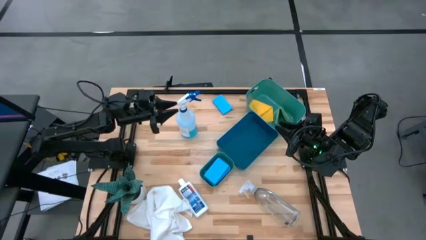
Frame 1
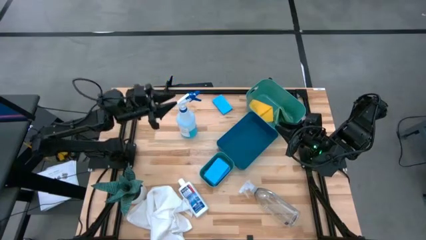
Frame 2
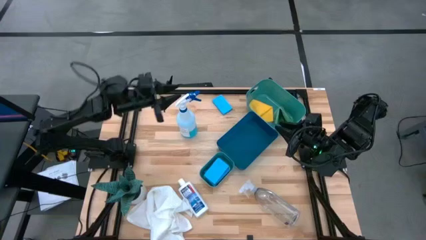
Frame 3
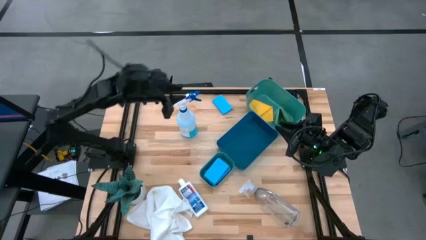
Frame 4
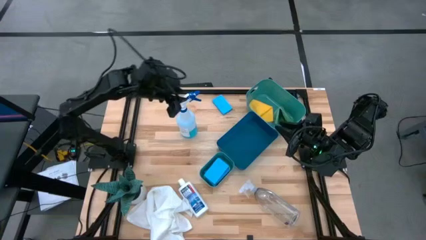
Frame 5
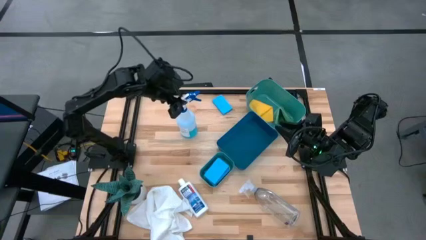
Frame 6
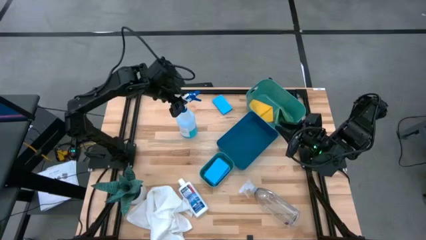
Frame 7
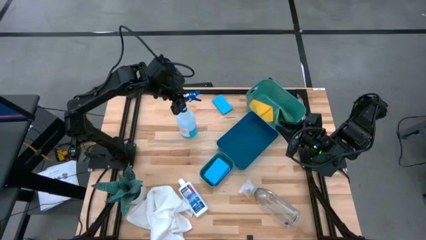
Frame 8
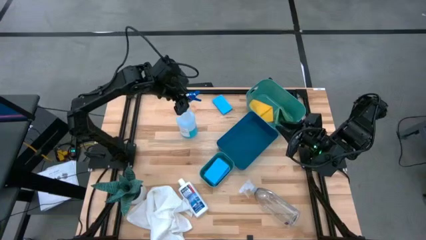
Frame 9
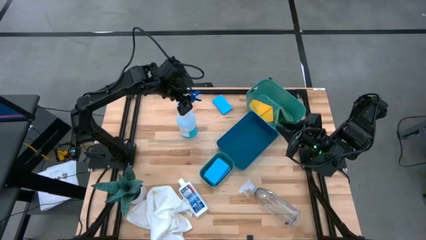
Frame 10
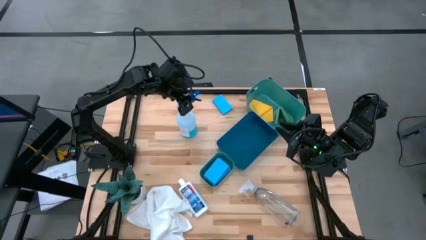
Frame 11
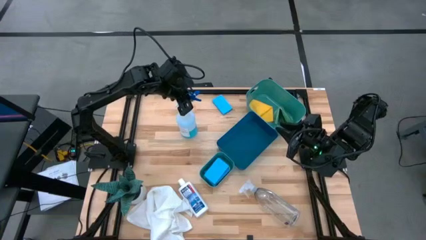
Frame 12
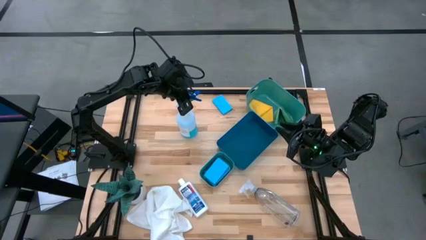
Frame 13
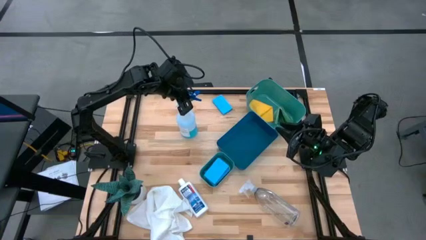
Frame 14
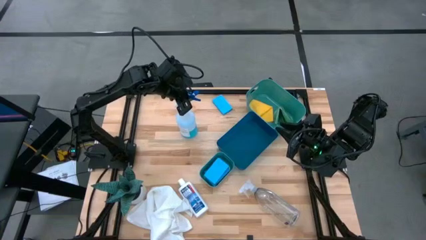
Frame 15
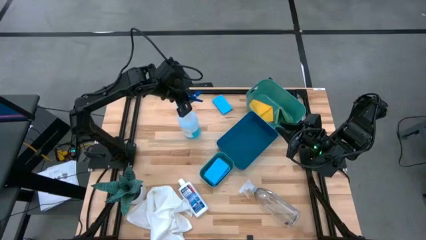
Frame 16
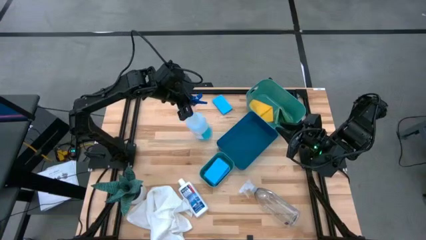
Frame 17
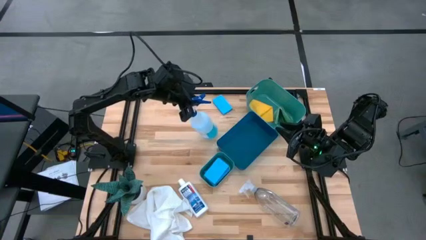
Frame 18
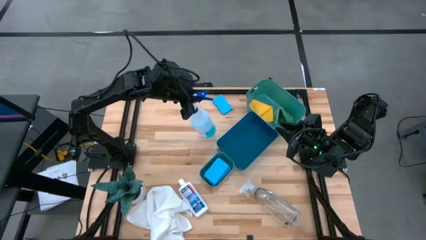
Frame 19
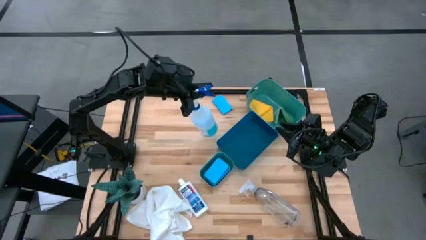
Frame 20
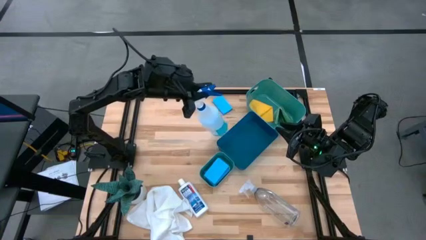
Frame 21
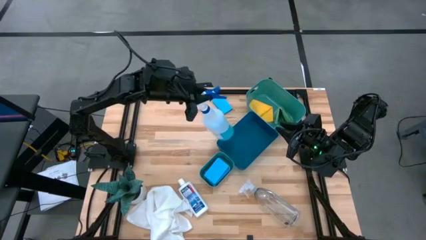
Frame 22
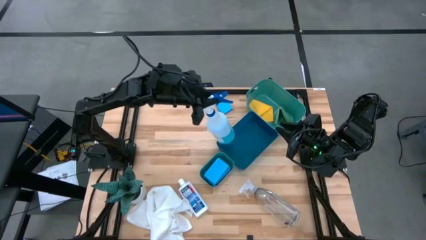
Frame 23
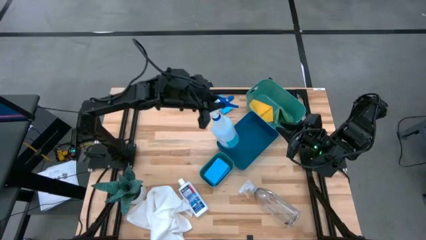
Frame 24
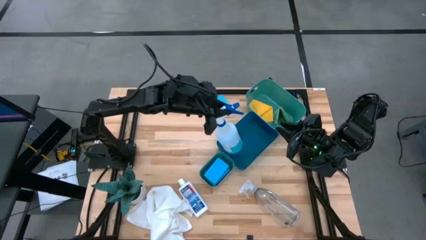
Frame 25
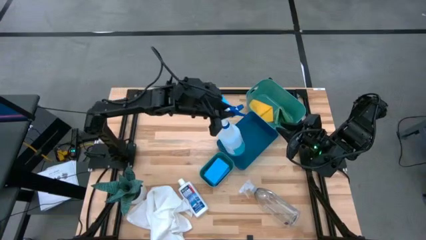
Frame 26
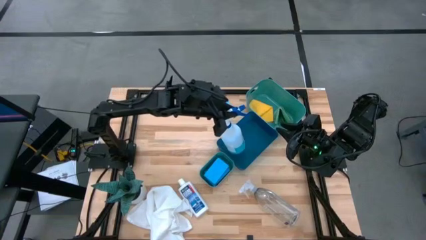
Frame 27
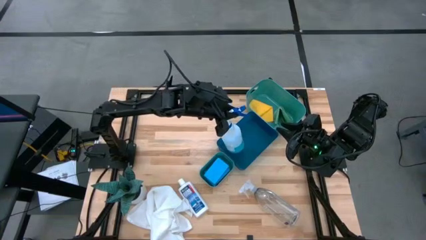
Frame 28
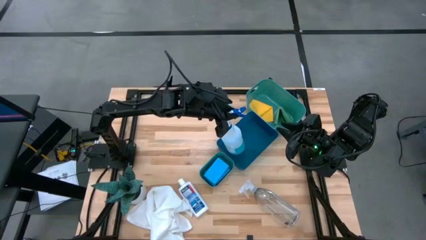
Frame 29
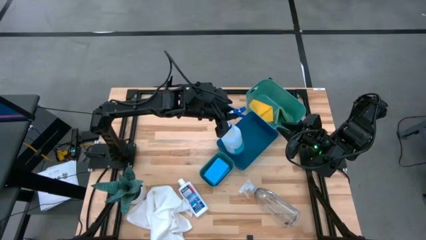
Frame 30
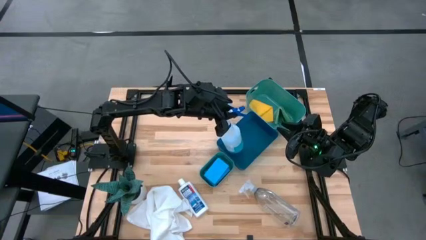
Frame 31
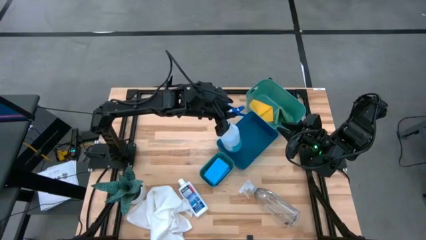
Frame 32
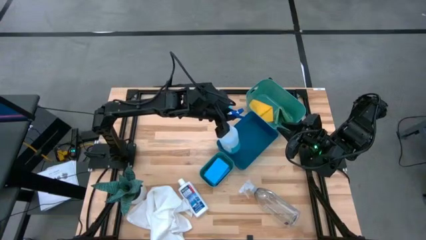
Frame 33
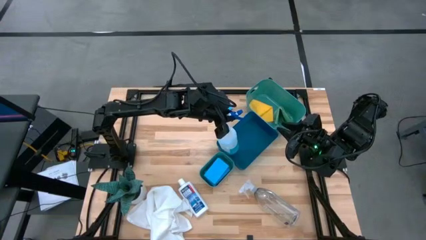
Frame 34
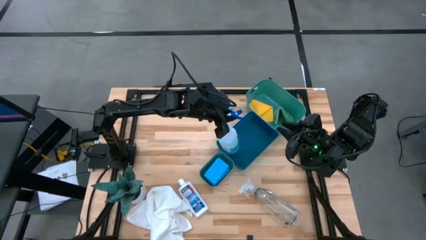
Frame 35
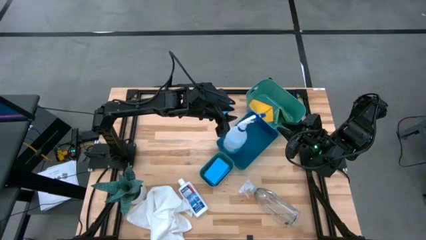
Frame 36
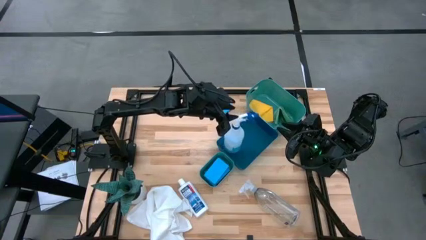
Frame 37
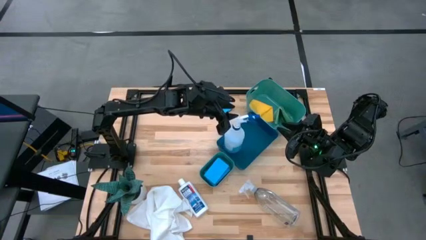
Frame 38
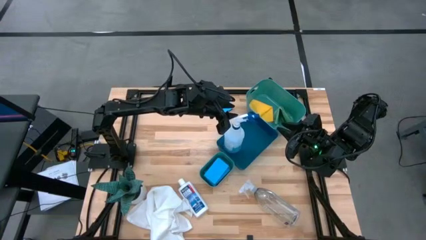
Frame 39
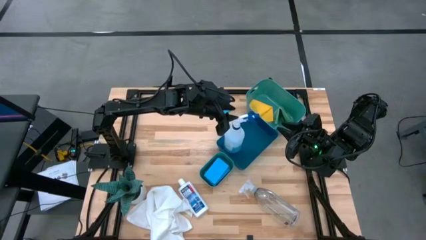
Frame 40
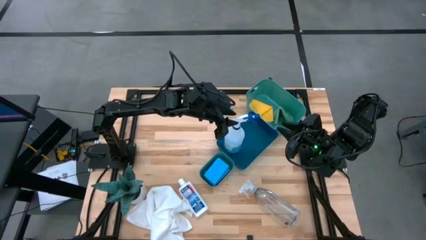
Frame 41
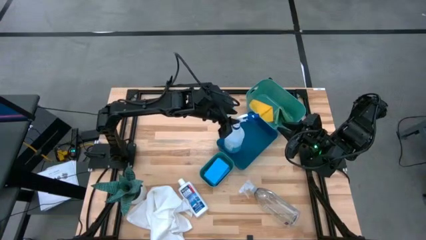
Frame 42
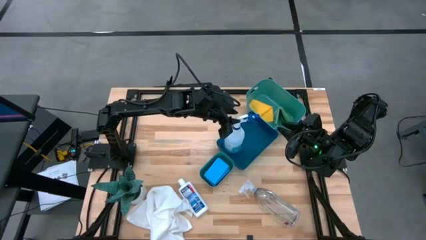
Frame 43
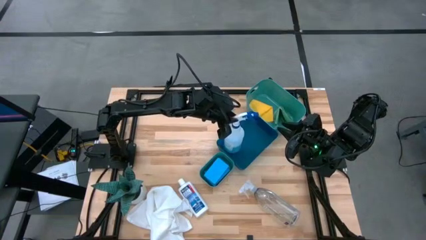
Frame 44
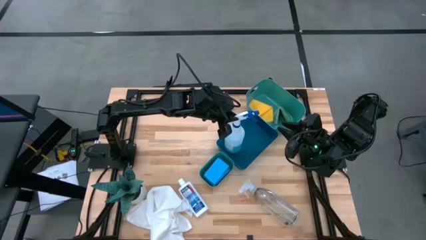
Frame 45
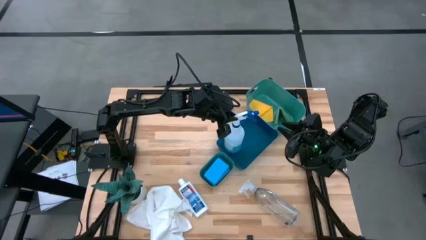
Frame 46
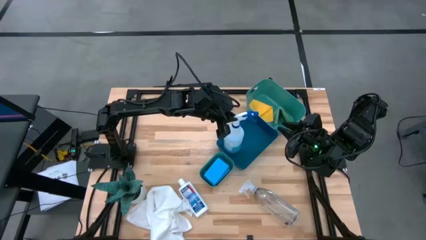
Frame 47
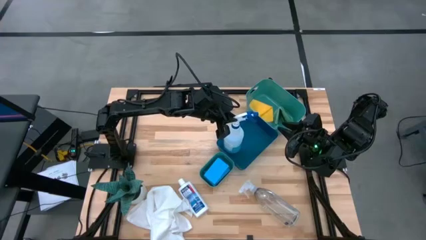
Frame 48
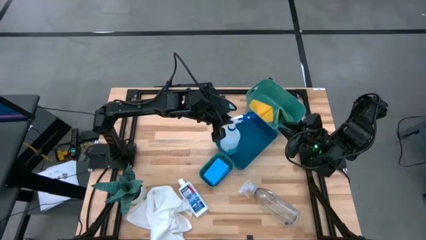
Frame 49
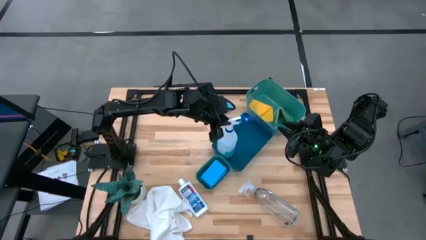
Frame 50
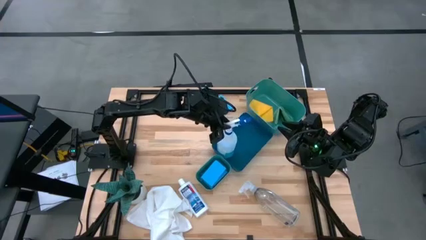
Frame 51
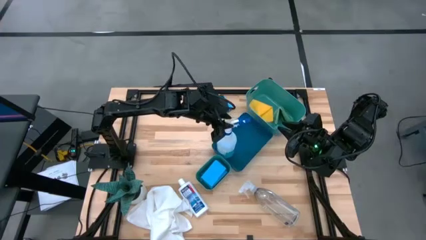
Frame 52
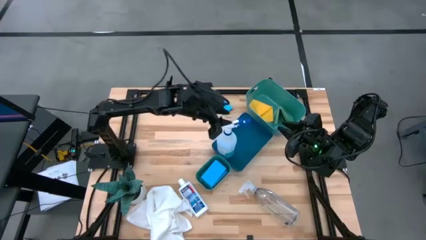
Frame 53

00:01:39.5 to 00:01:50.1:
Task: Pick & Place Kitchen Items
Put the blue spray bottle into the blue bin

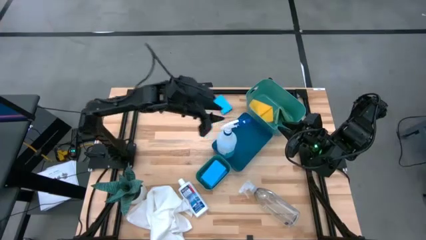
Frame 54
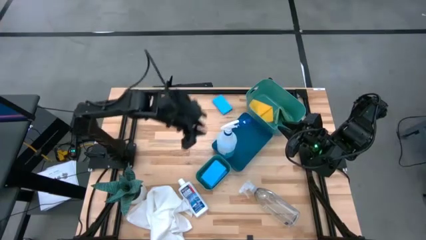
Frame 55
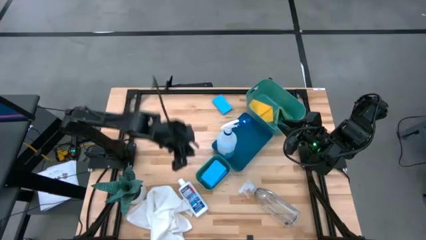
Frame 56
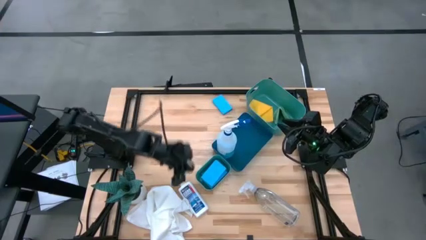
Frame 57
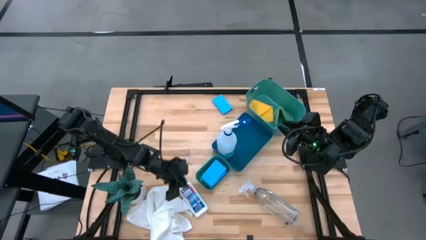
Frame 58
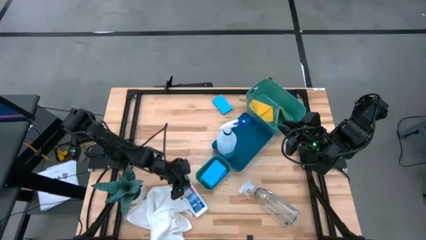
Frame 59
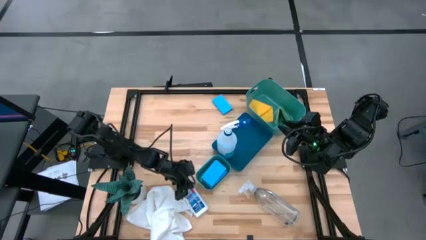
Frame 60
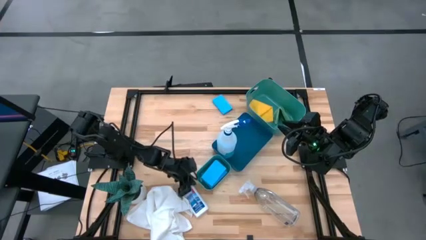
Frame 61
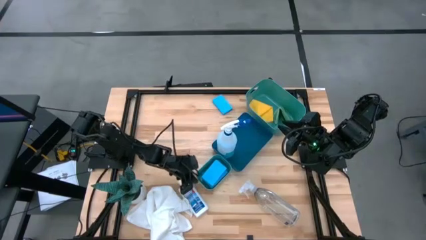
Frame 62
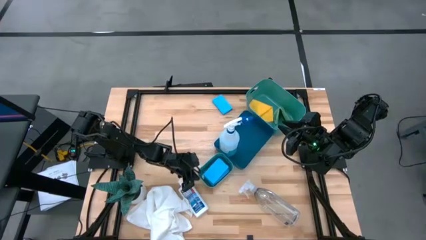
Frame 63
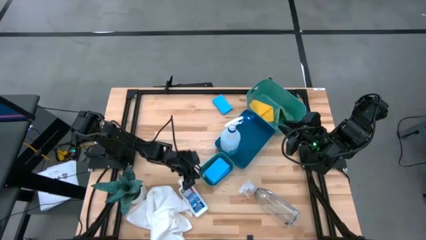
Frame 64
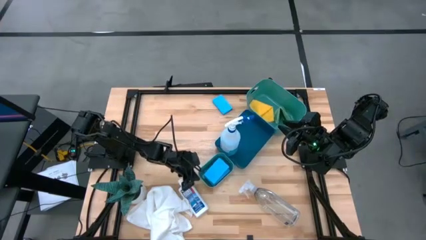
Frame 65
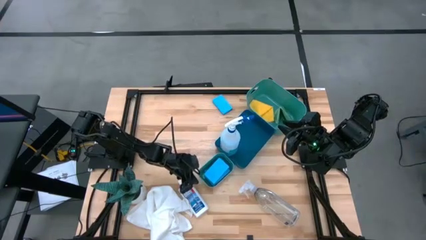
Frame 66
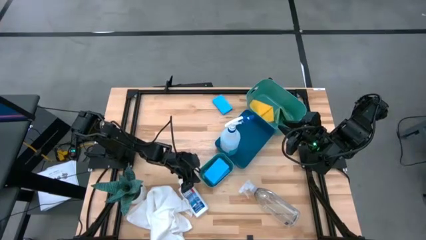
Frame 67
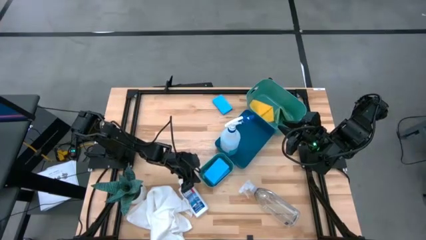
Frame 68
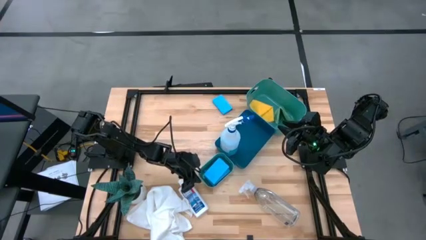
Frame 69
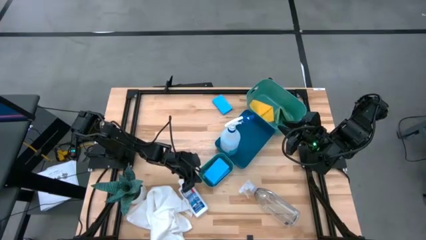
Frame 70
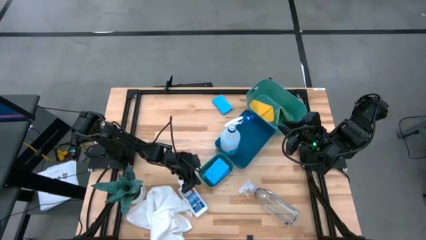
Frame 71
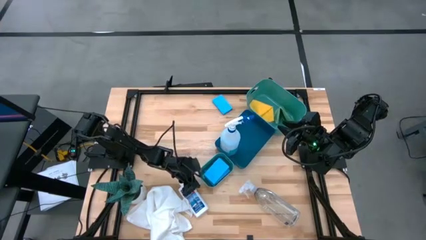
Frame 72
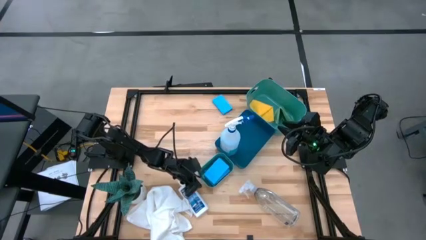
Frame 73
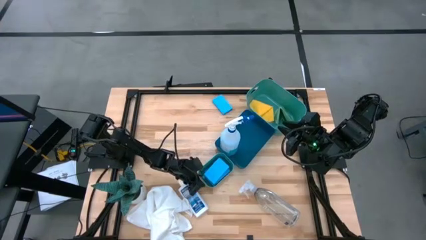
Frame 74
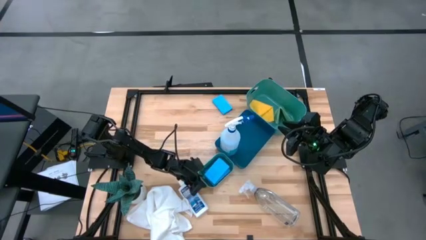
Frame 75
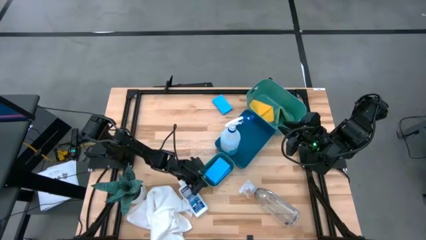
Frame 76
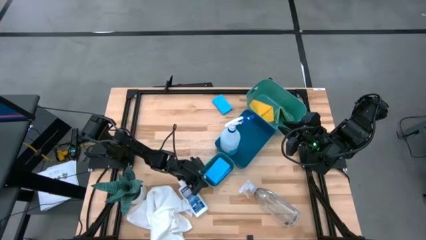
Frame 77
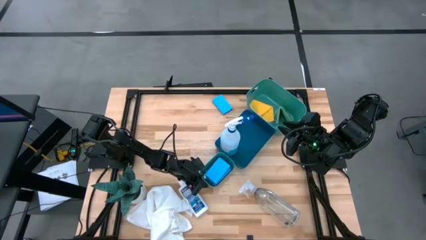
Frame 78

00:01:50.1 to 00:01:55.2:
Adjust the bottom green bin
